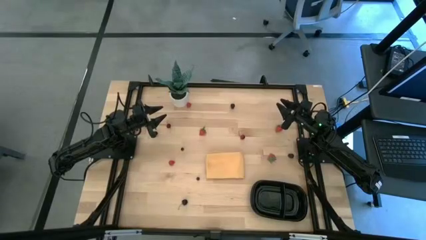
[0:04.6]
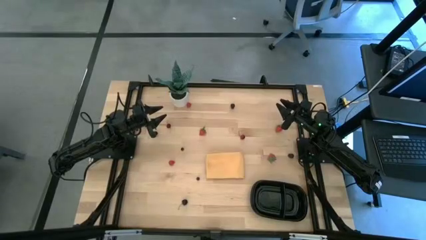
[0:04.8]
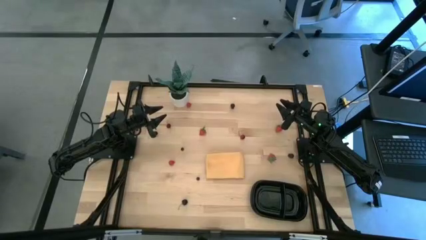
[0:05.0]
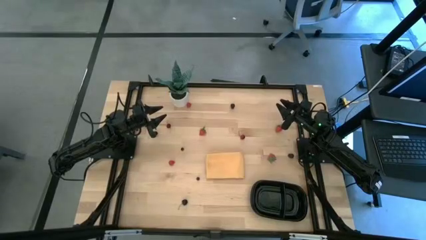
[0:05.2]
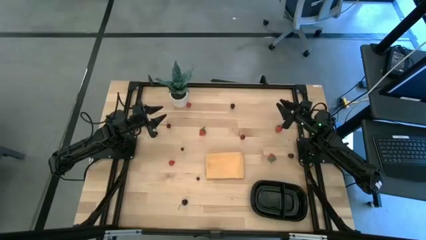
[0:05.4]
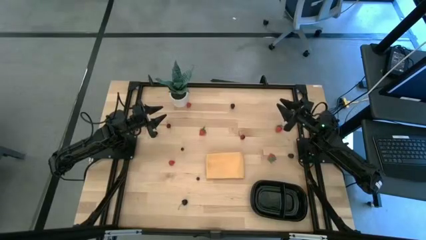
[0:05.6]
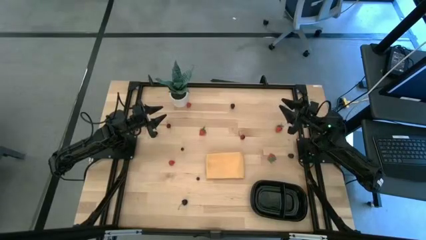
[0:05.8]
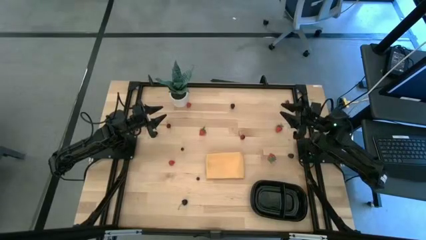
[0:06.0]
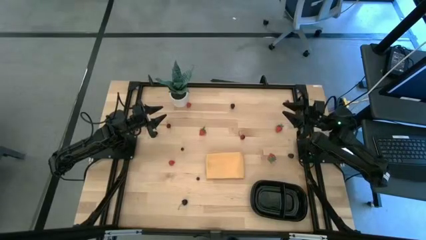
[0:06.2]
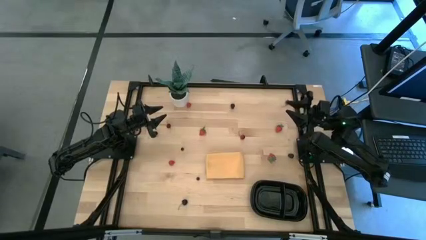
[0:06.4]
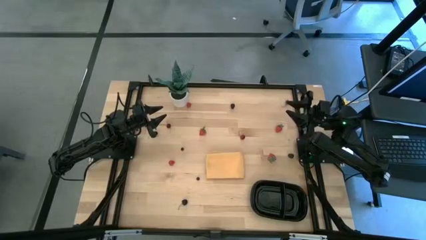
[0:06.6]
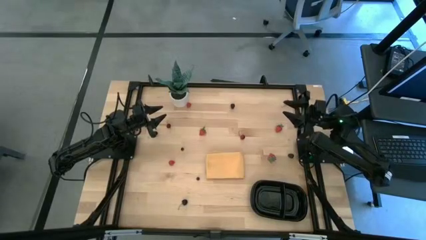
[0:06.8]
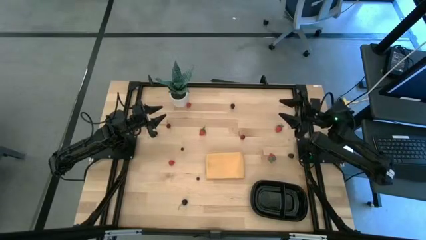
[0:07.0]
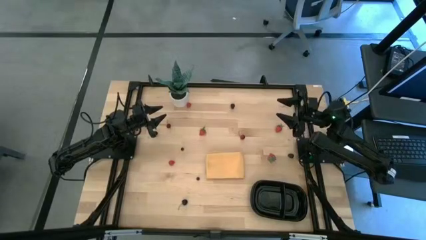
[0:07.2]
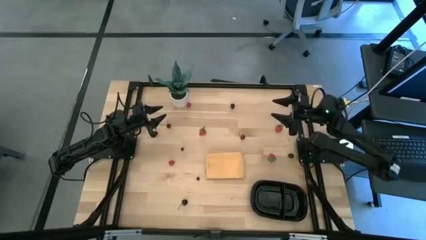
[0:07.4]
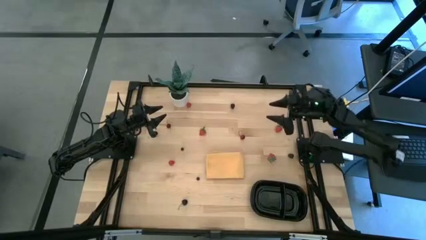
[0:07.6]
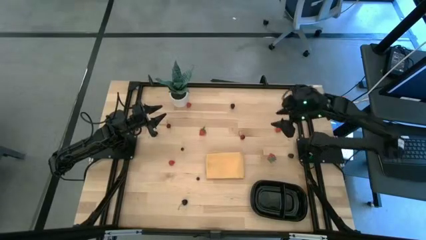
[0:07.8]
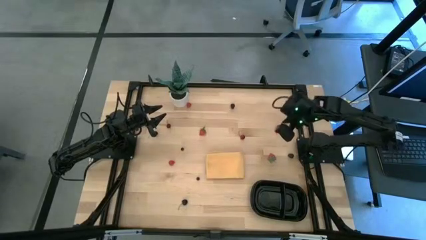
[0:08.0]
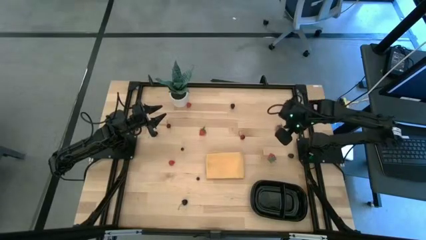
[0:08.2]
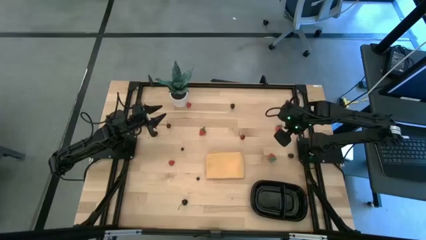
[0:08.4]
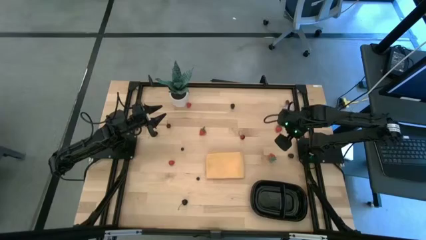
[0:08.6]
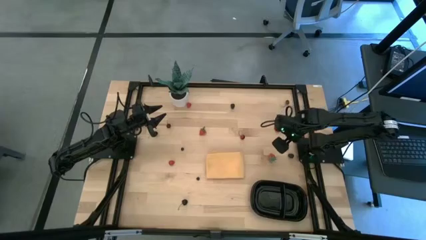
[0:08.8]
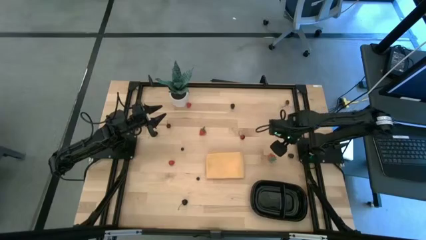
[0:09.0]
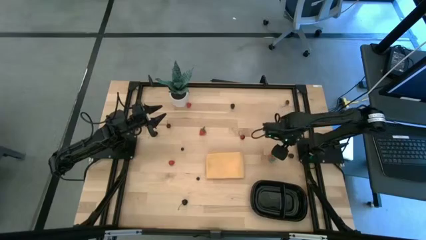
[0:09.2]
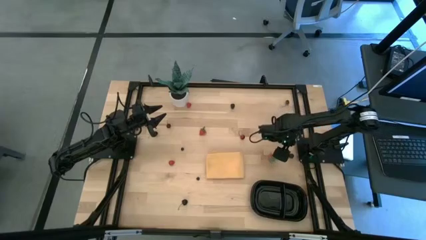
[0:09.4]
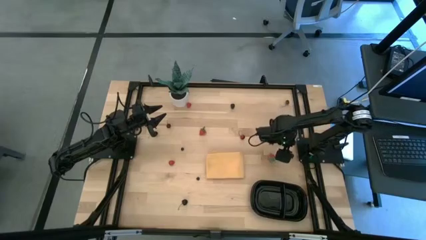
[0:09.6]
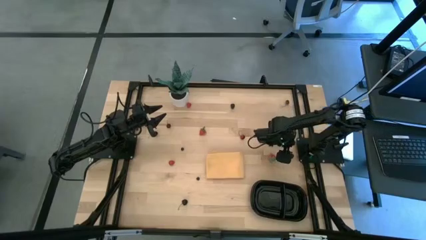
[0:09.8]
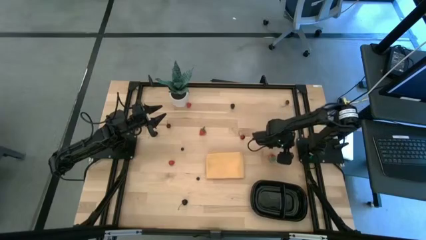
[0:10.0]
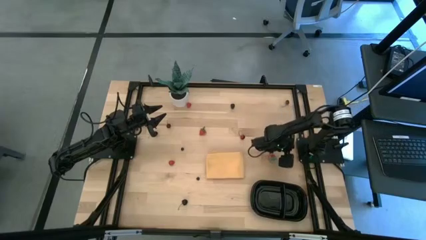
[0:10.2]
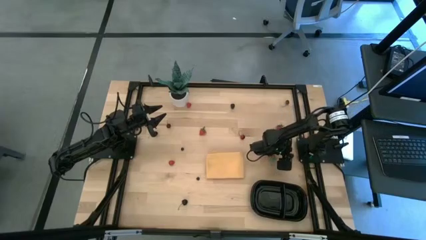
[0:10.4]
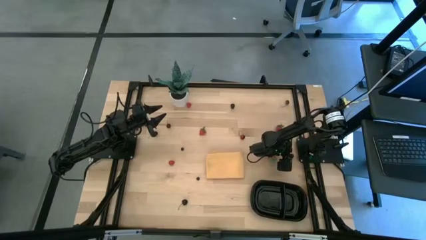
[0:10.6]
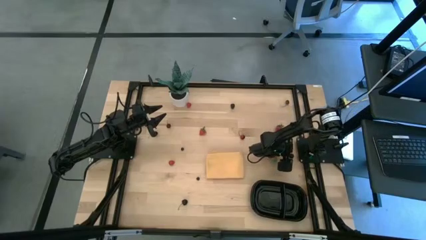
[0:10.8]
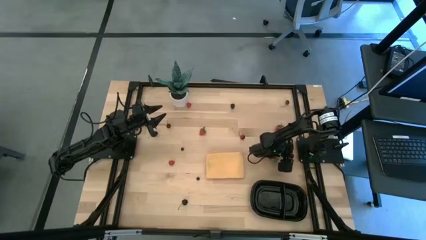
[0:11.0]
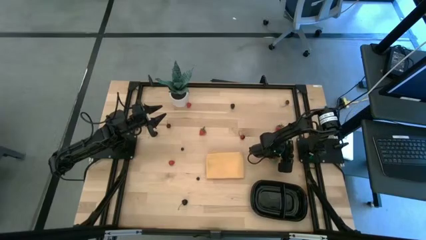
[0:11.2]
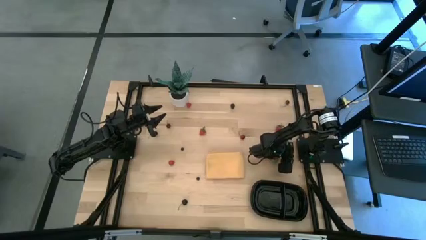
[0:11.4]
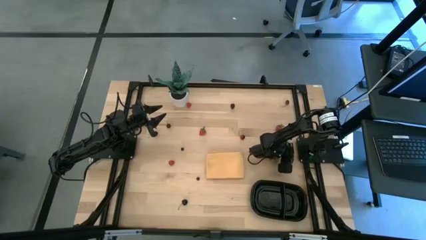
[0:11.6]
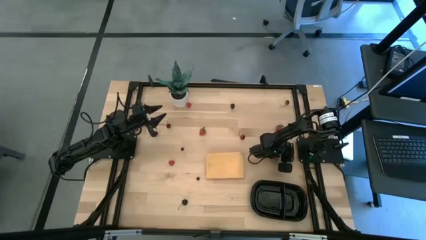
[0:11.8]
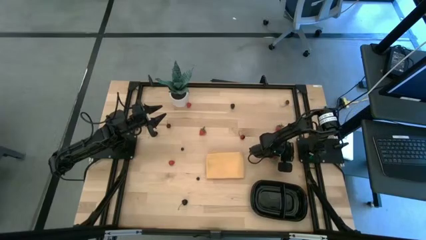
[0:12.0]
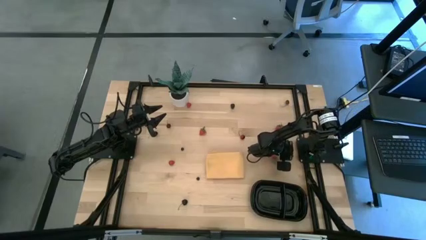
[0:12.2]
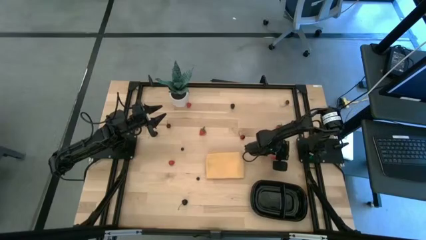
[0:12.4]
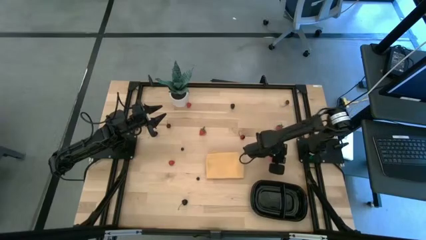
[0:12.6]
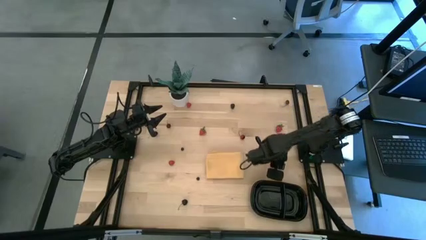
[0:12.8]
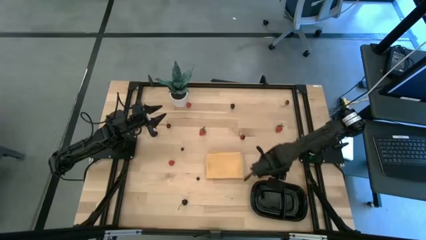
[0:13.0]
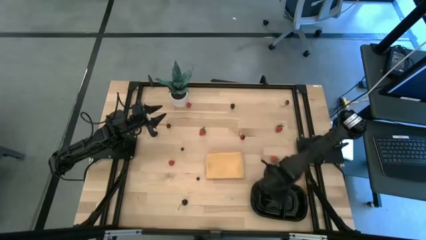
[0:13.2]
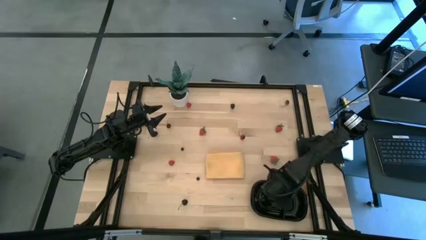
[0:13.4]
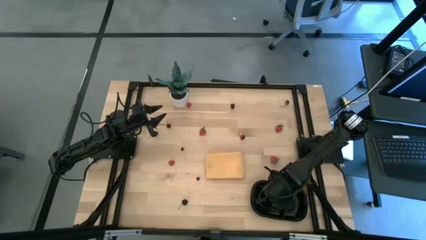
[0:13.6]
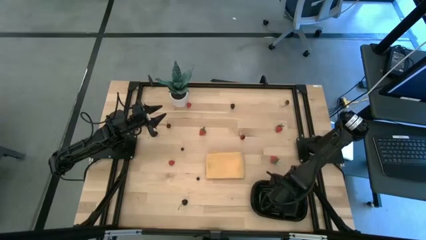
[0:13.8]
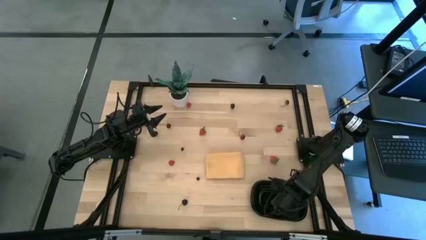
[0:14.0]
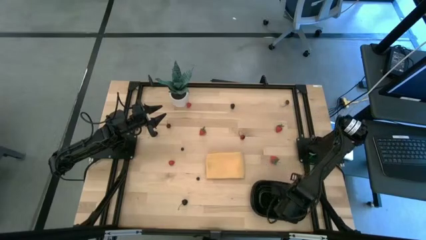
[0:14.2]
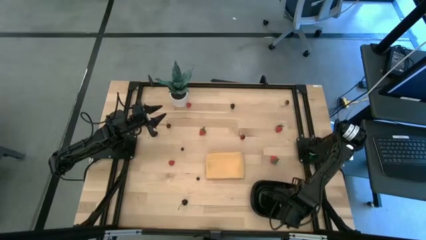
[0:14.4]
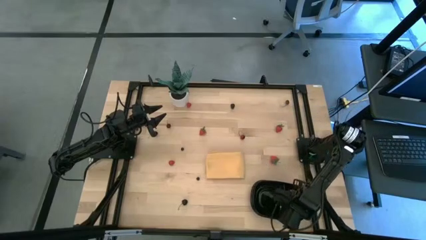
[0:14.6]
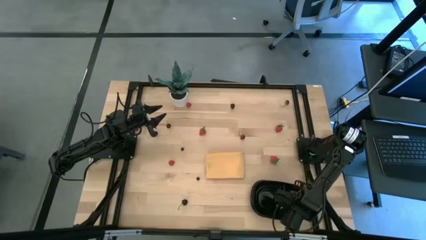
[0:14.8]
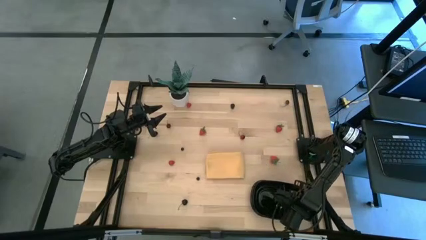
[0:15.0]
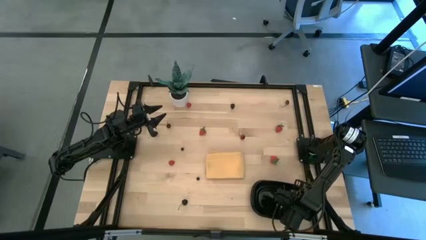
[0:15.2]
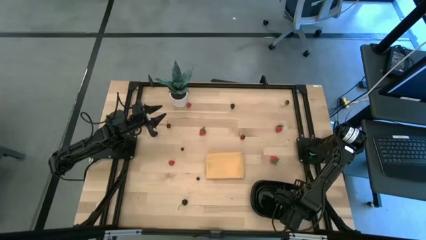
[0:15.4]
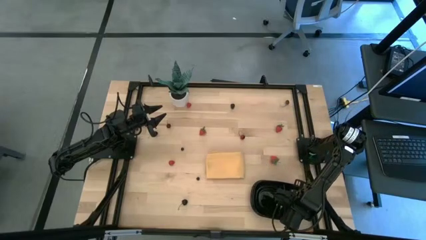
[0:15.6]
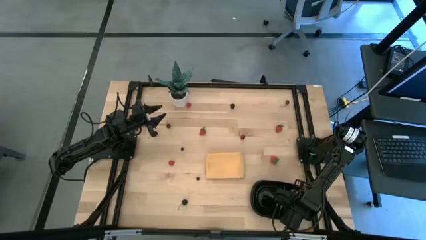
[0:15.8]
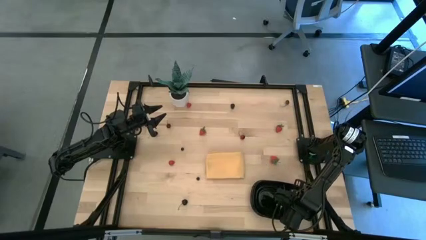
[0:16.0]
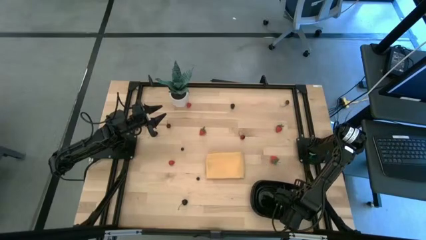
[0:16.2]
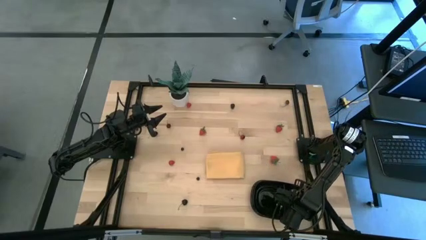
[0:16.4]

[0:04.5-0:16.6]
Task: Pick and placing Produce into tupperware
Put the black berry into the black container

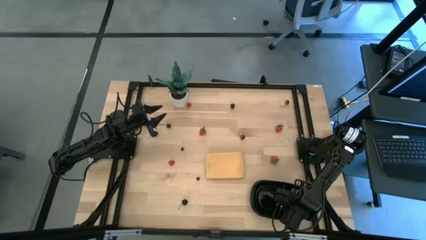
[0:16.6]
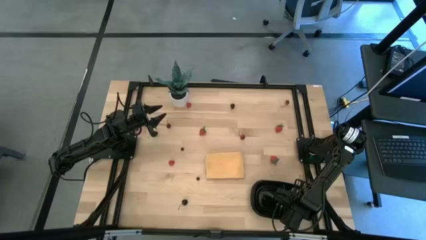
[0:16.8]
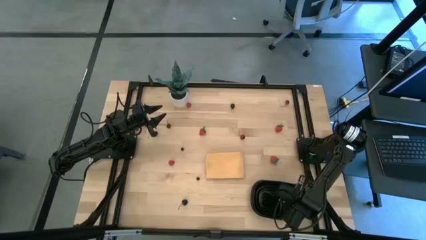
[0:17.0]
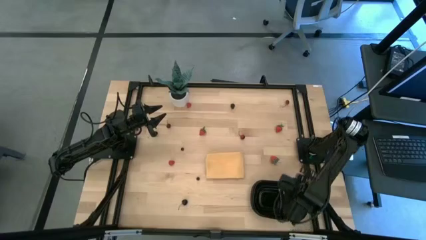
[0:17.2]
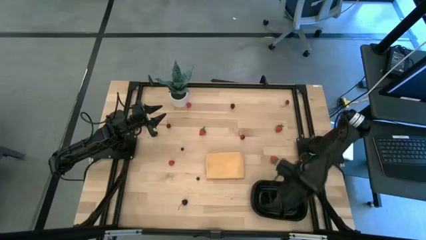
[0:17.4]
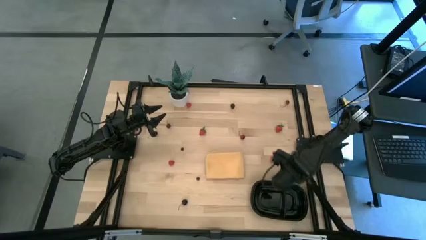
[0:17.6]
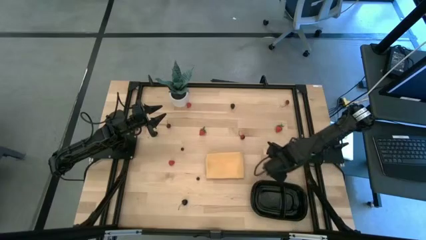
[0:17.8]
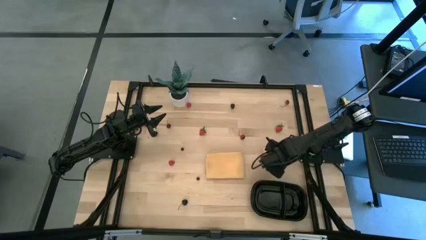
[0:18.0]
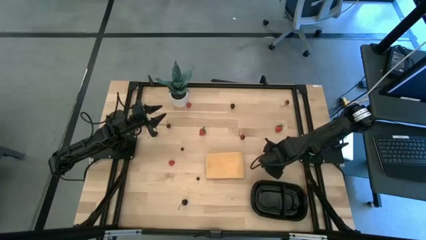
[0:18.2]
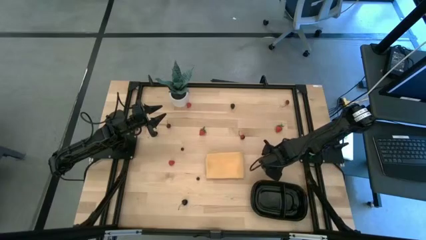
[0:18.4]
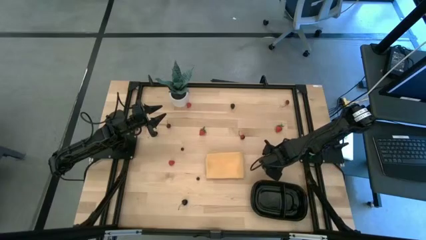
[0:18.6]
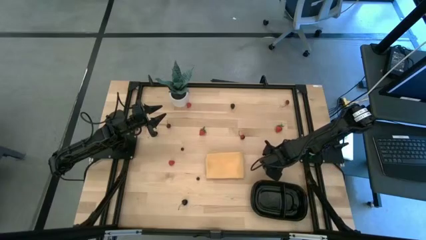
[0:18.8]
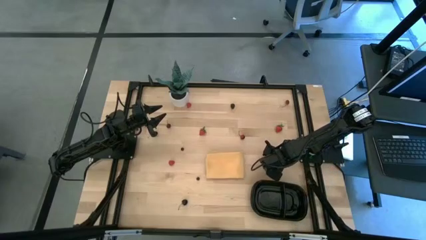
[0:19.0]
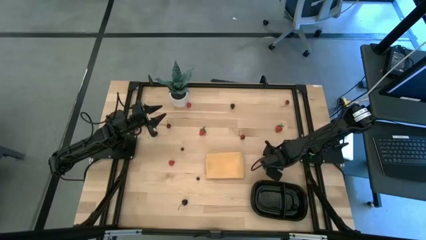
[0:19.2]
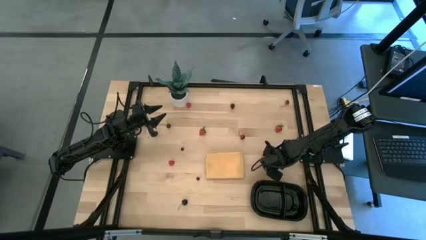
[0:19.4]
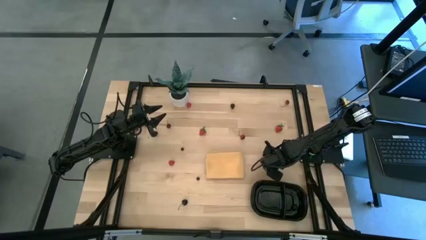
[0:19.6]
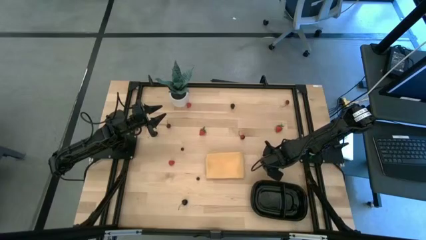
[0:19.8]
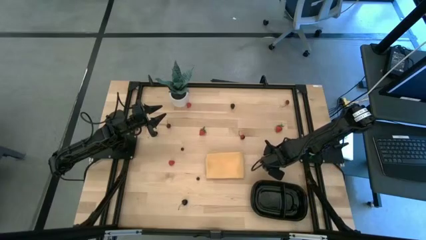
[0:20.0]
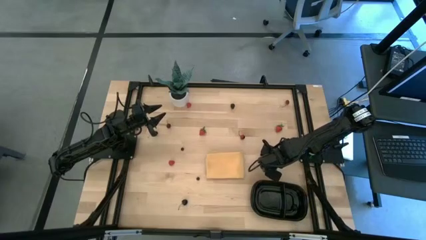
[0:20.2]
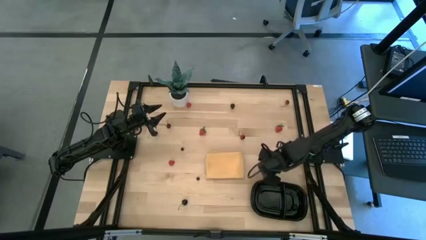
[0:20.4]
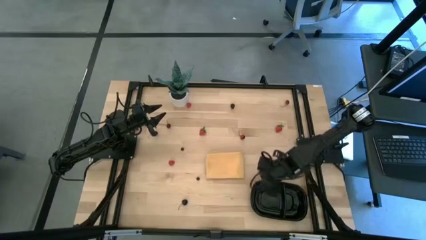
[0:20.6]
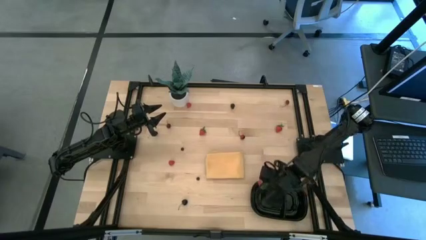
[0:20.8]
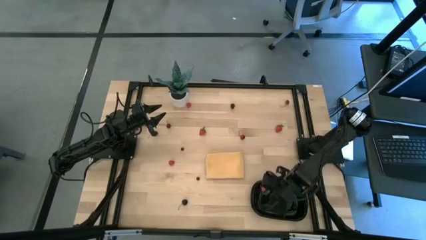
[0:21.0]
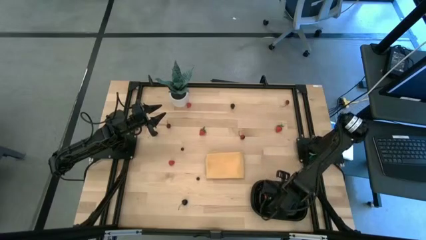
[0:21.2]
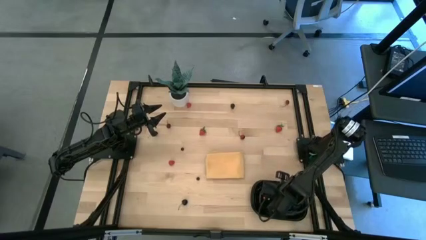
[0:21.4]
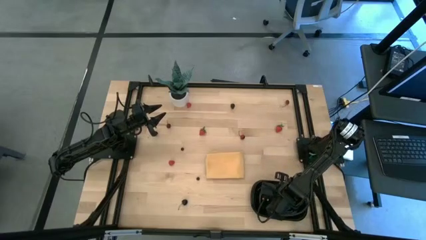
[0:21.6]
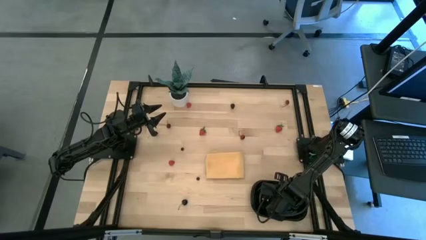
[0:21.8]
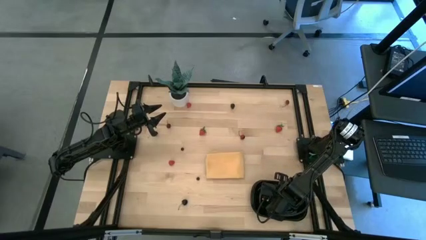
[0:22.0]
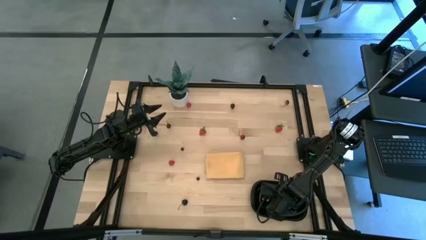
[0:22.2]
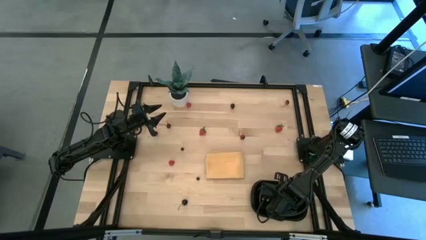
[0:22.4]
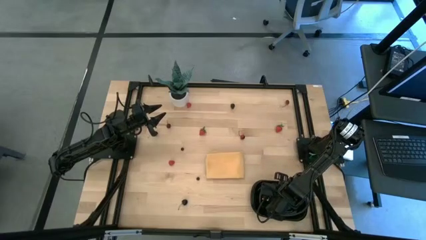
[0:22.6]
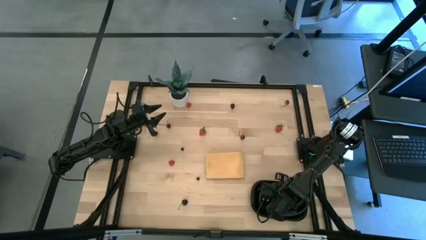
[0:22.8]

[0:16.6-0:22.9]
Put the bottom red strawberry into the black container
